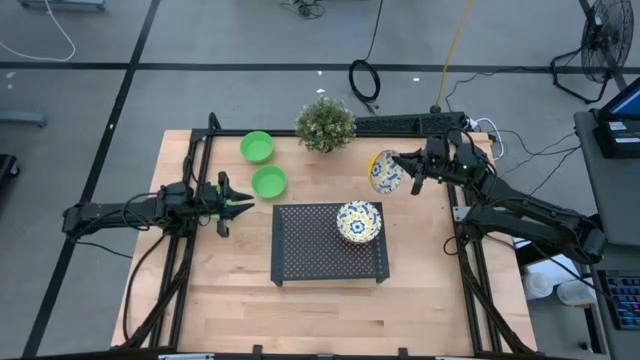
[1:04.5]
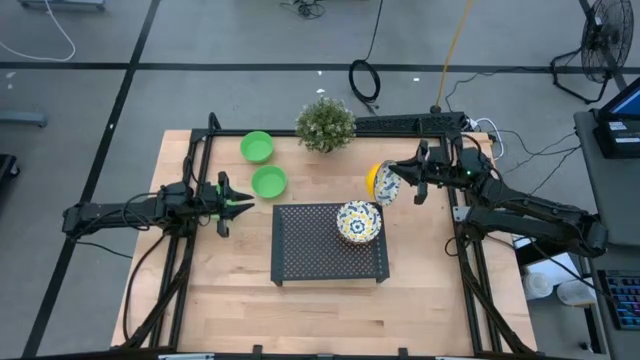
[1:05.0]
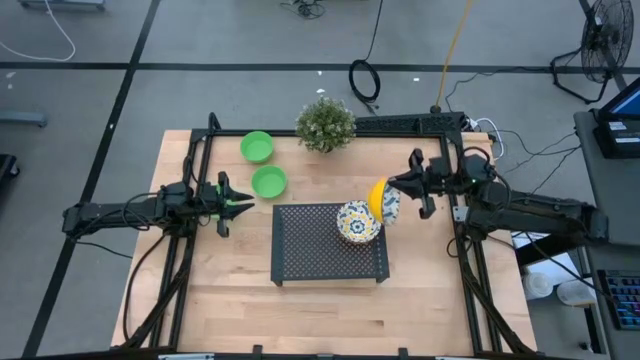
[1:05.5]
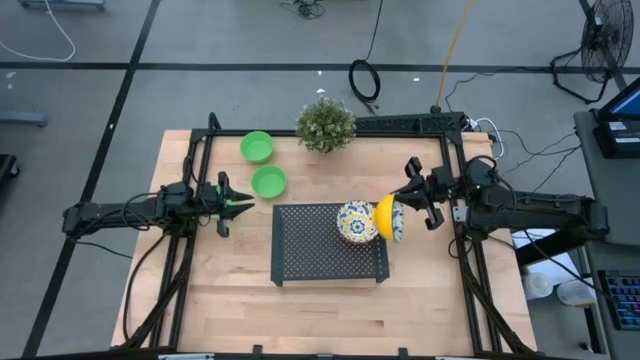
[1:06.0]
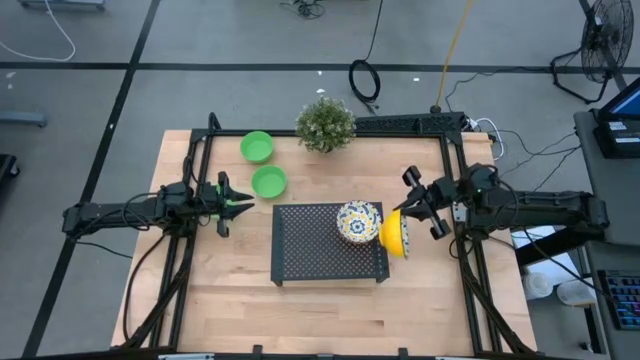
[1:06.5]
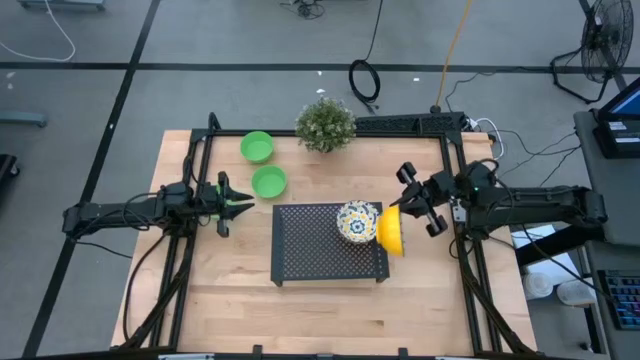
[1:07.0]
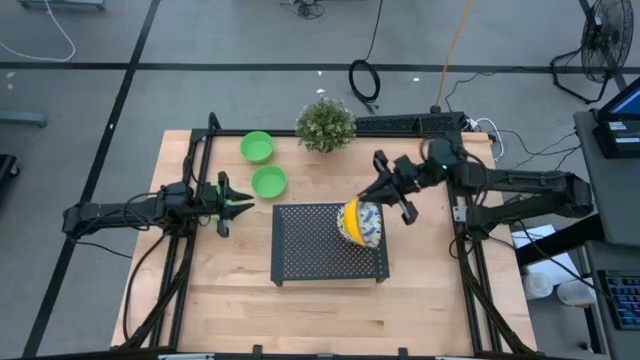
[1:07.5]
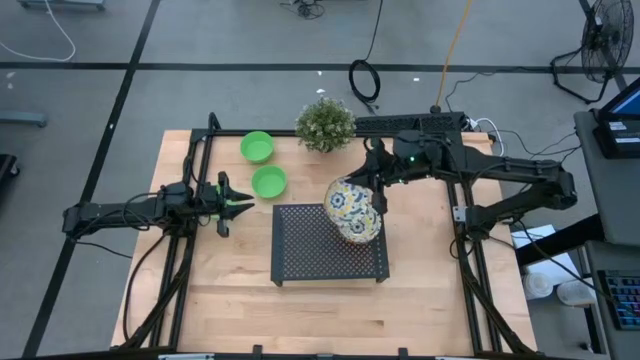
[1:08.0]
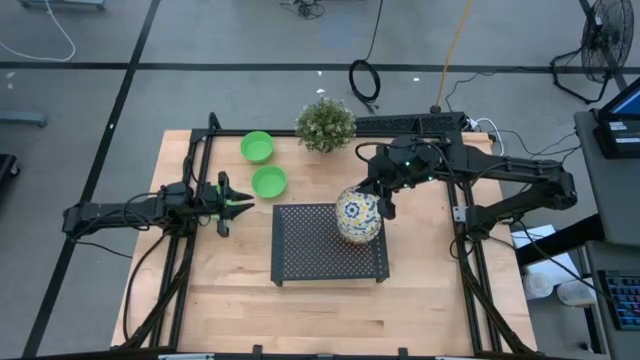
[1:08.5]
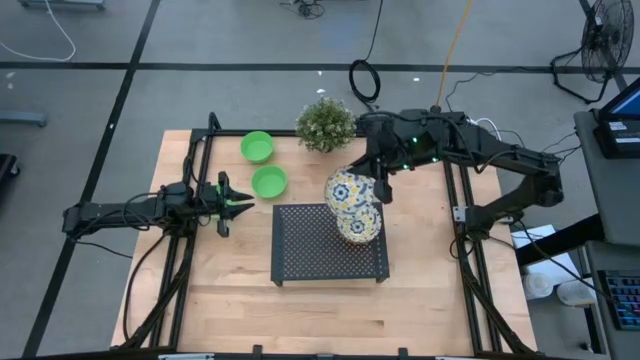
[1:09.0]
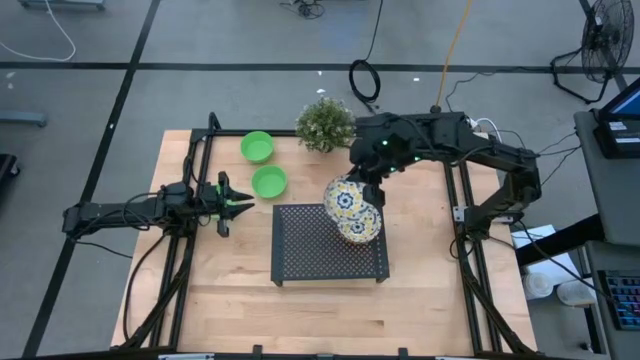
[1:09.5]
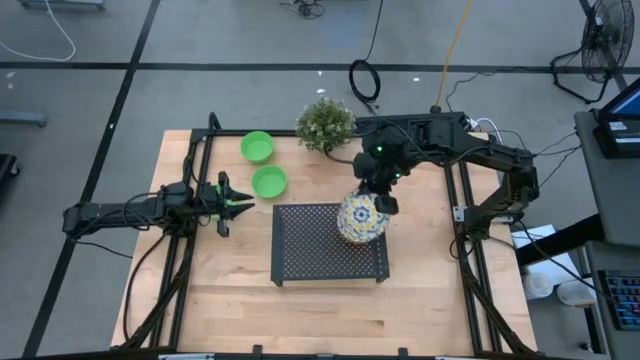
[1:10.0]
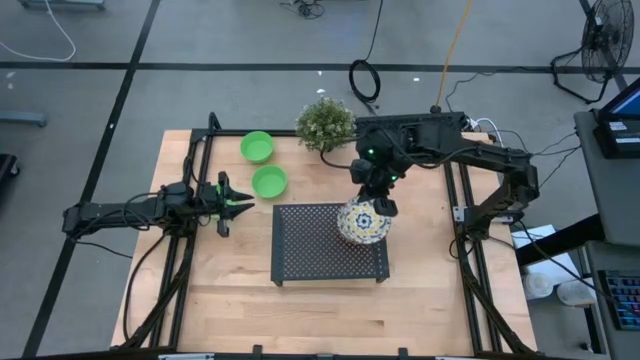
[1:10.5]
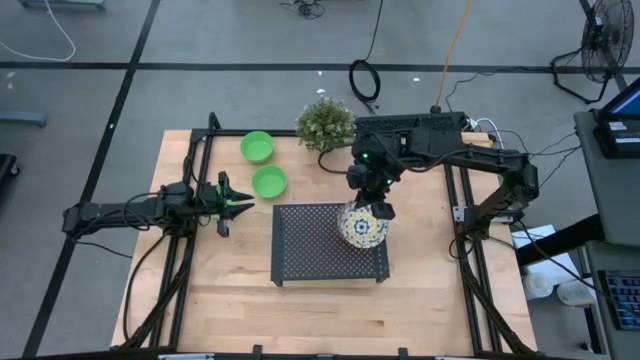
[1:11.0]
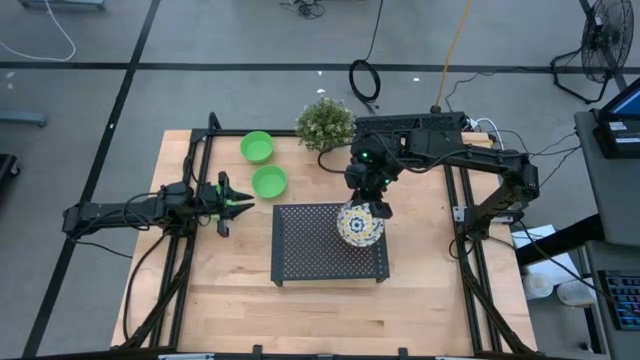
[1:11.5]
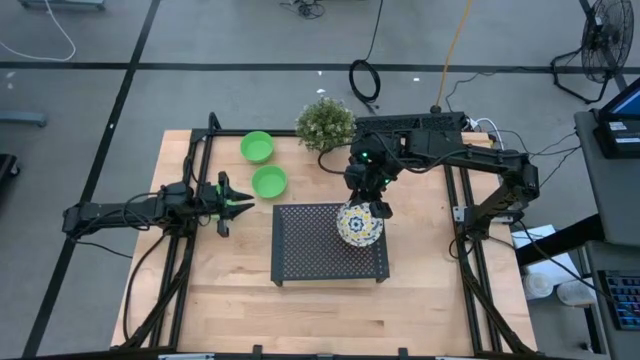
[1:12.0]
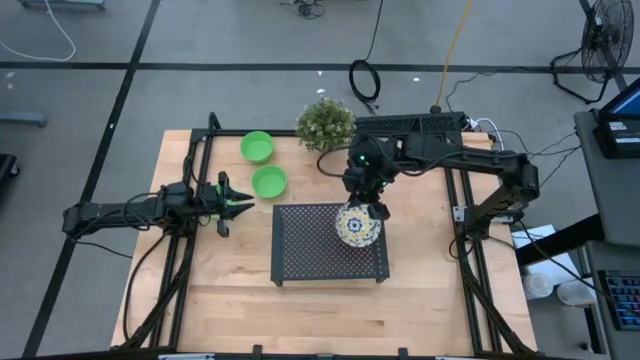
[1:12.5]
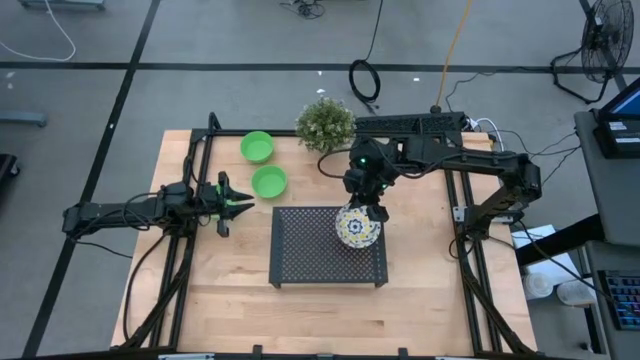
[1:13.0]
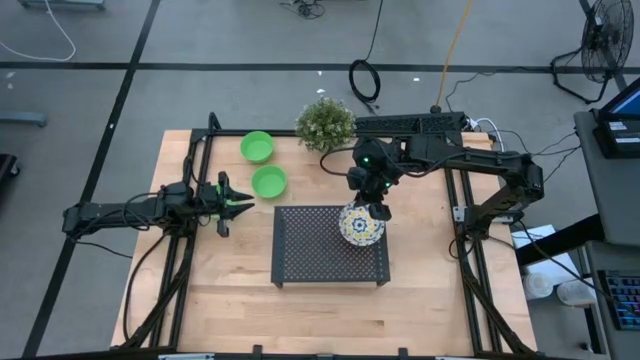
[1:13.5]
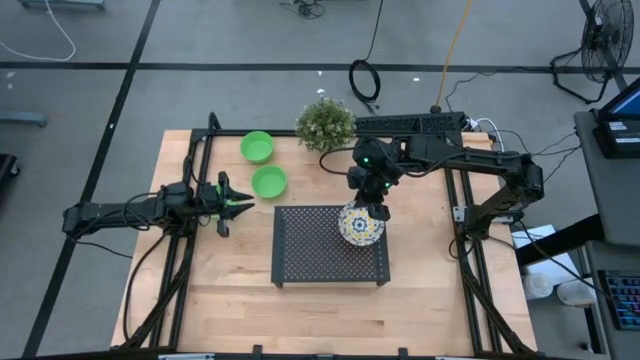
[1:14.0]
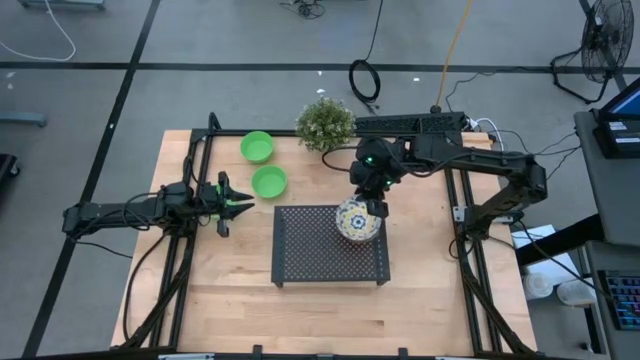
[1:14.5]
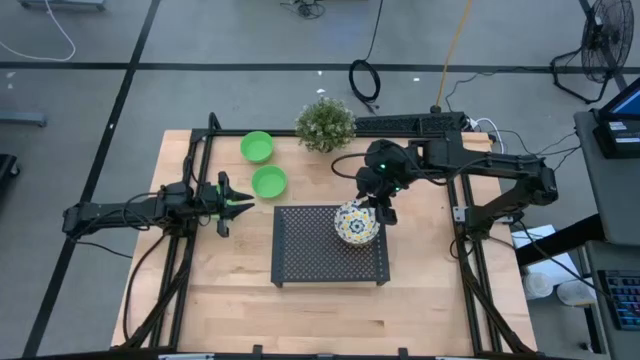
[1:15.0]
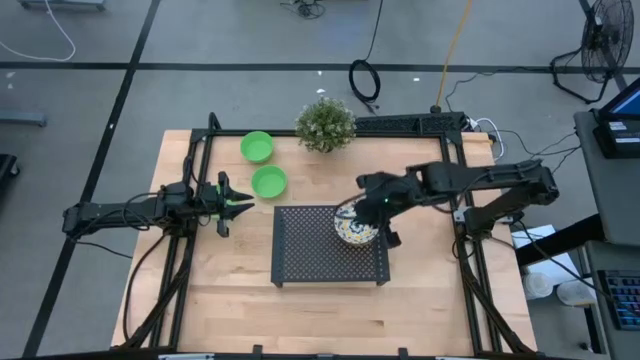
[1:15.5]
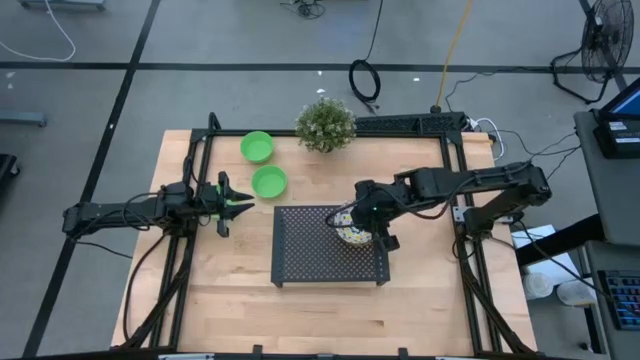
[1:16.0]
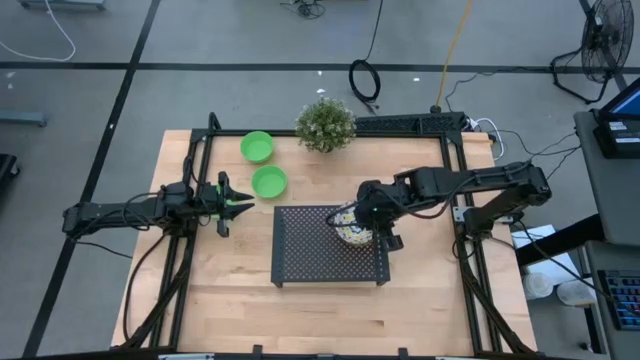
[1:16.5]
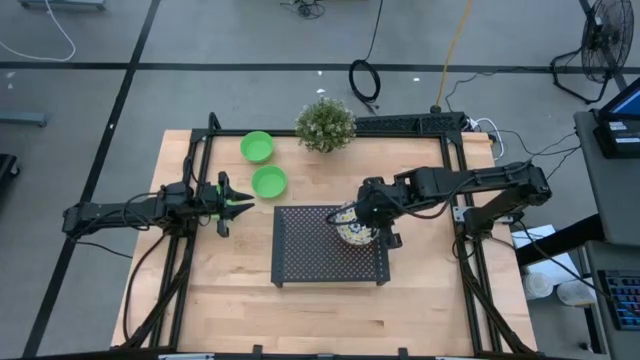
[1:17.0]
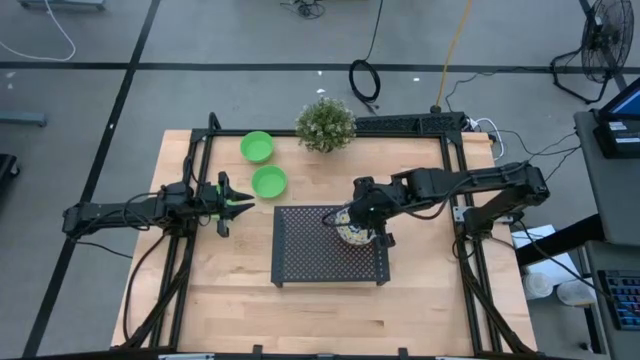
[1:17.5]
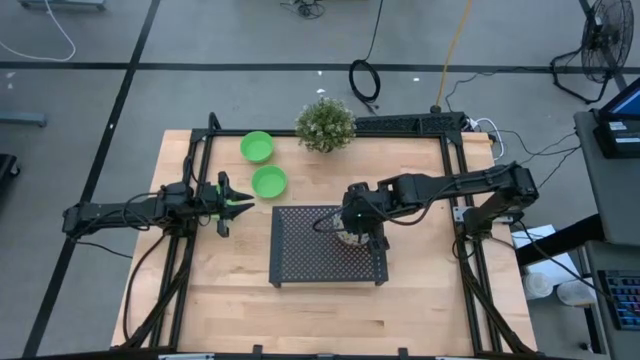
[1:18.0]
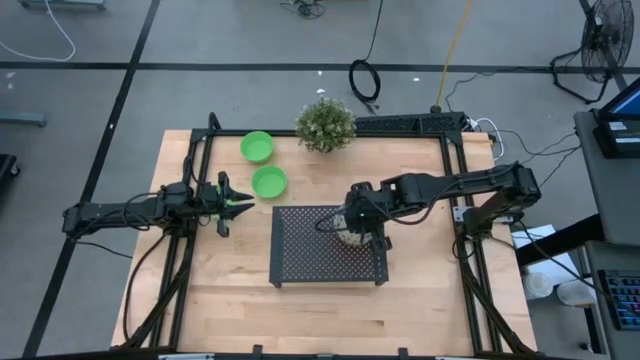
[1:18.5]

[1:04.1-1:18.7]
Task: Pick & Place Mini bowls
Stack the white patterned bowl on top of the white patterned bowls on the shelf

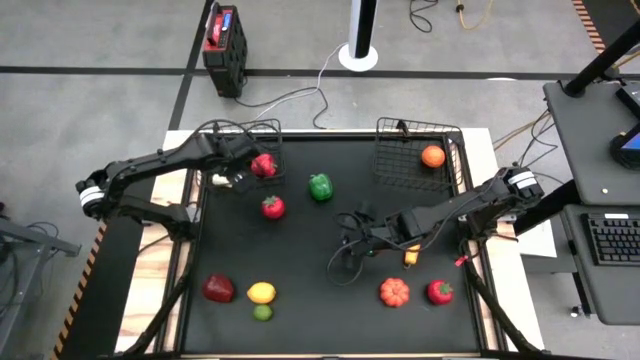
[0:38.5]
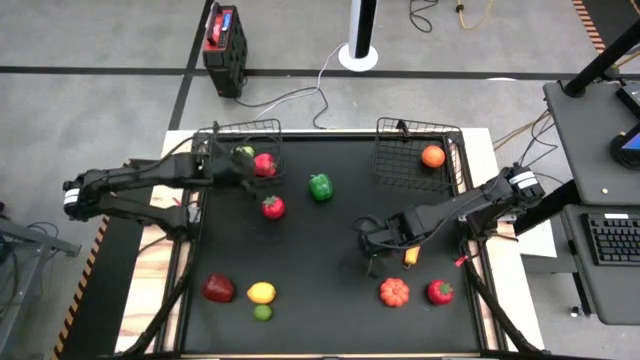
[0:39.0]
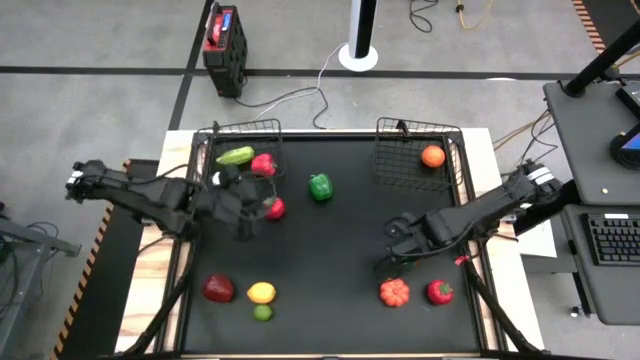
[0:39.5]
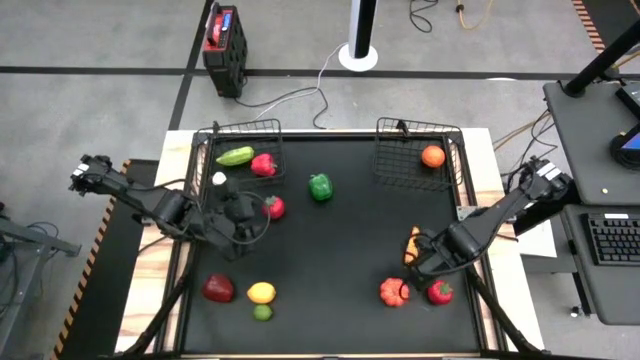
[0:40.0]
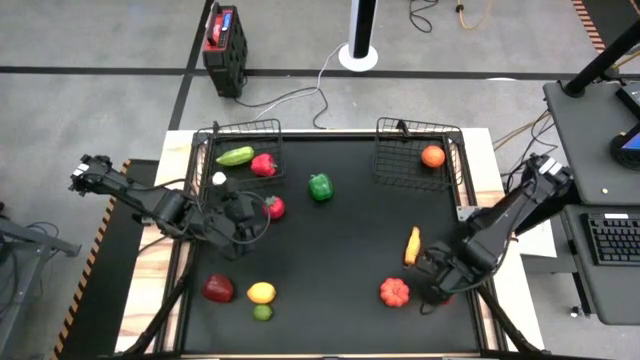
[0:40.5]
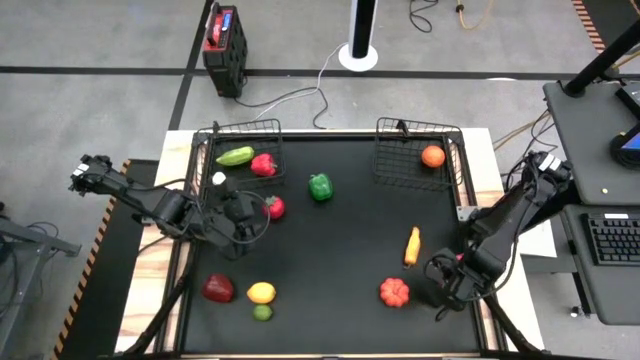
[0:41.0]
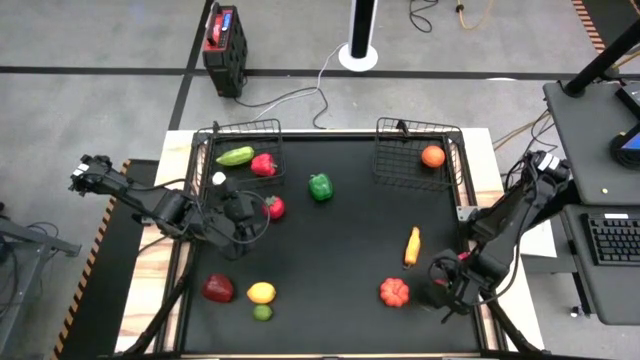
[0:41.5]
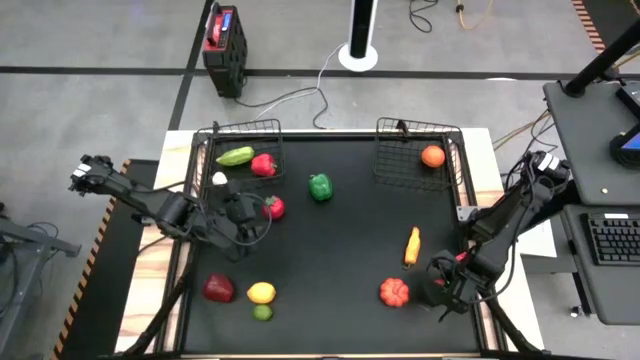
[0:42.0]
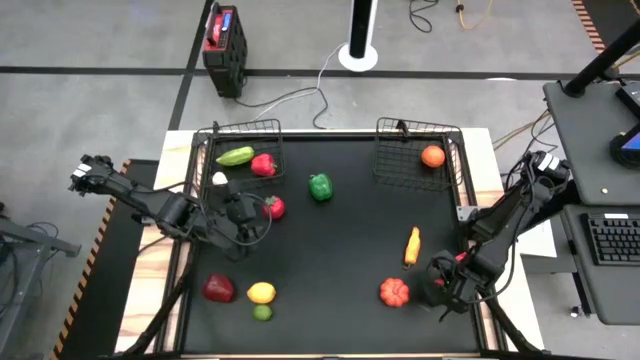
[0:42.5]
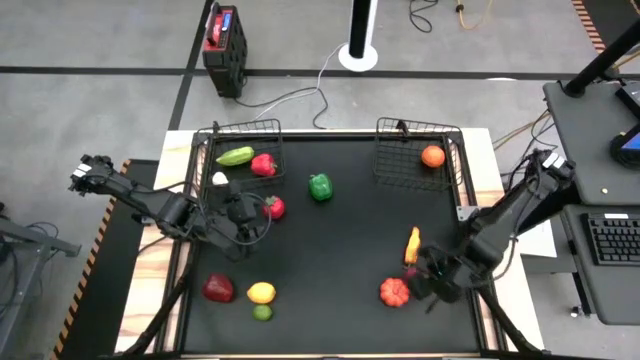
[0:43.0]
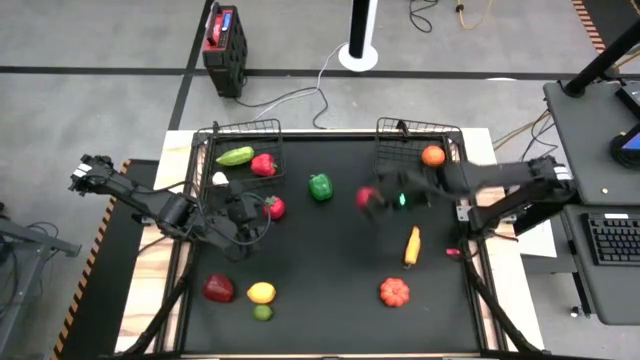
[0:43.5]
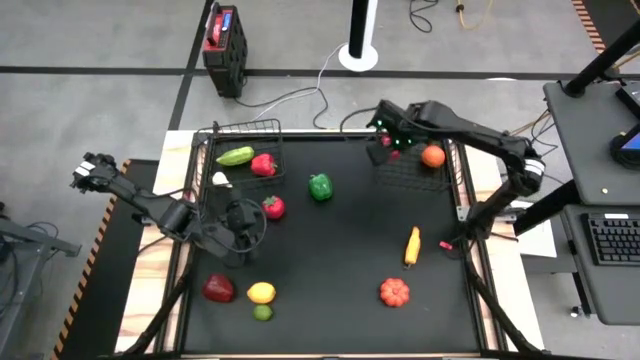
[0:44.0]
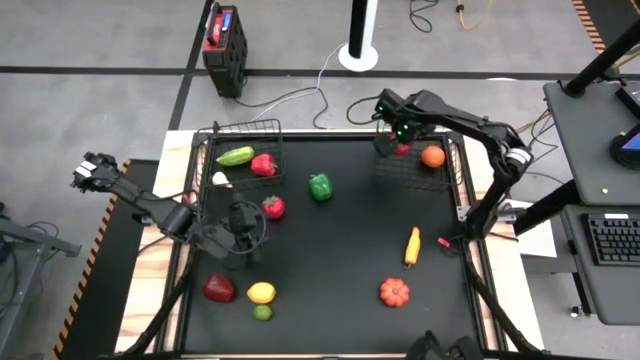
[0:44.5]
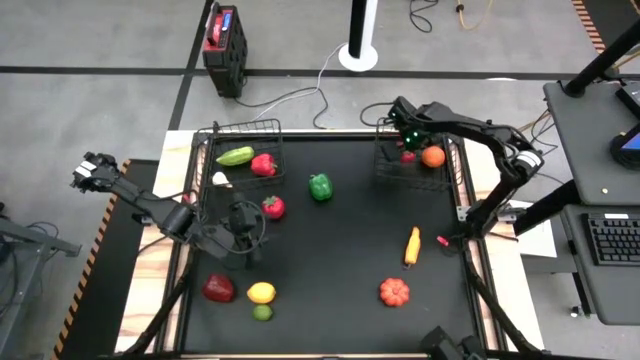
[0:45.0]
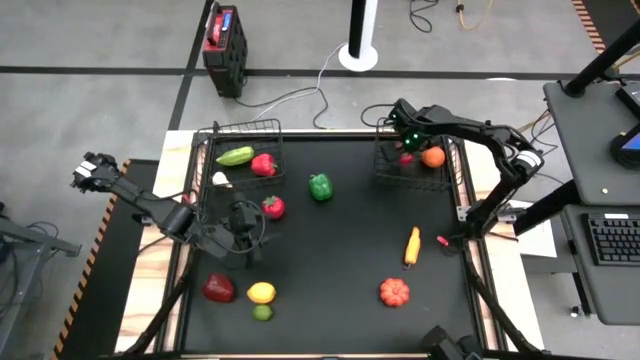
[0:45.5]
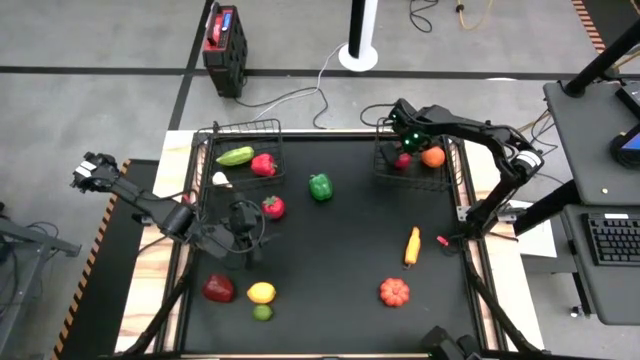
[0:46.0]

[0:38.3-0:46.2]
Task: Sort produce into baskets
Put the bottom tomato into the right wire basket
